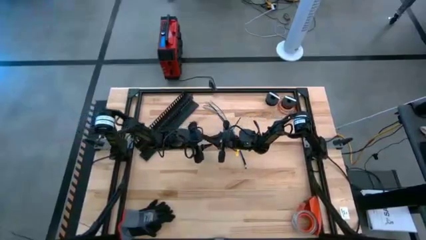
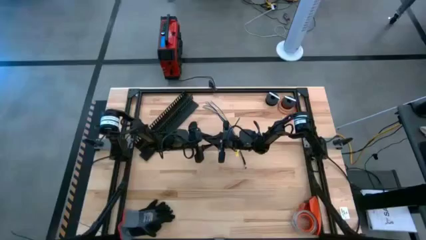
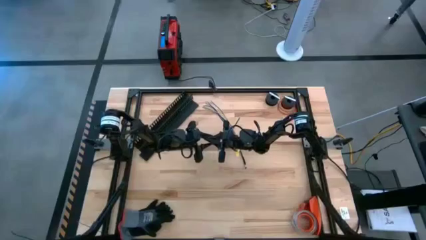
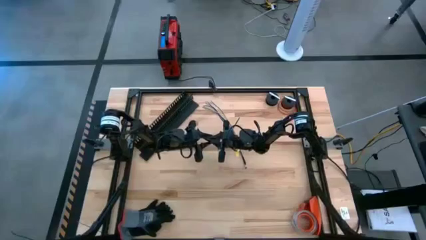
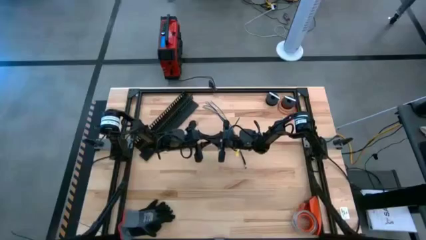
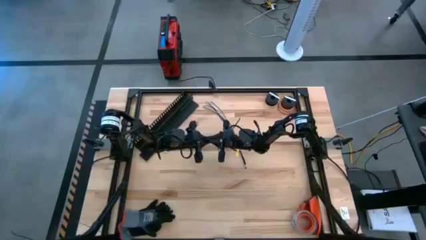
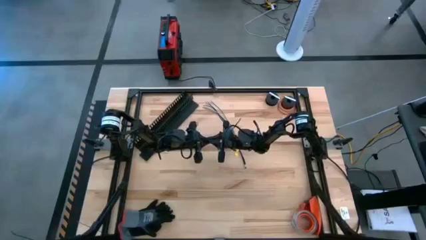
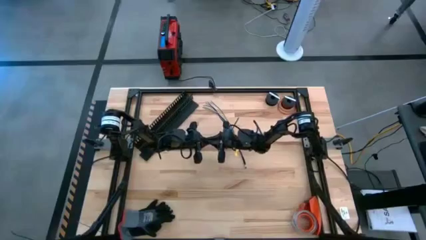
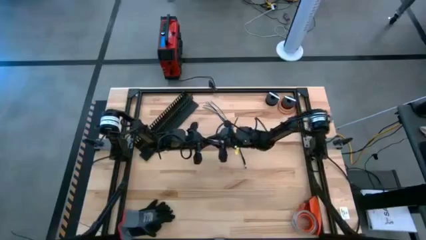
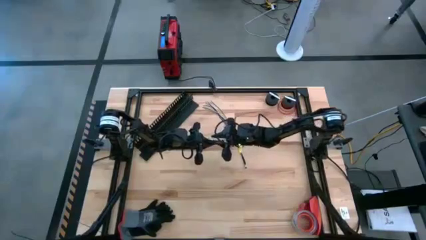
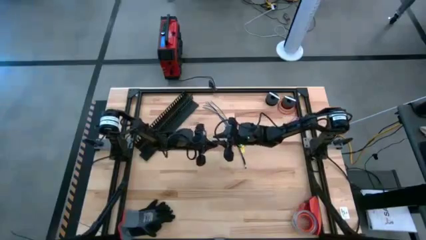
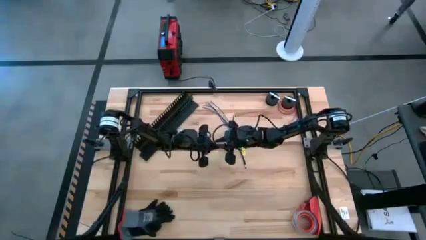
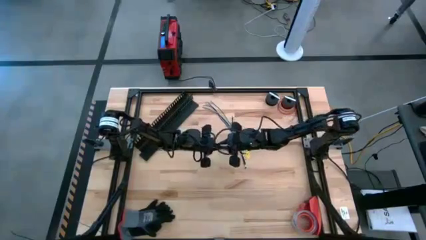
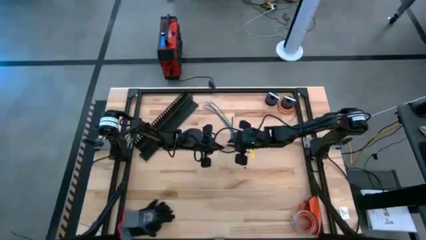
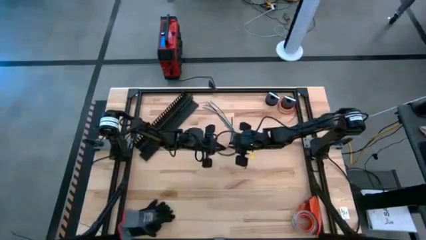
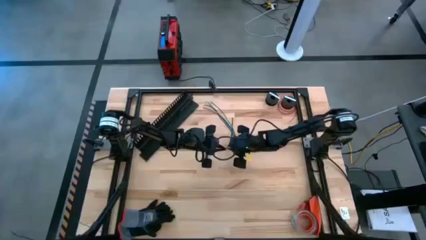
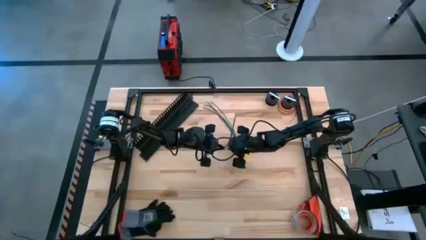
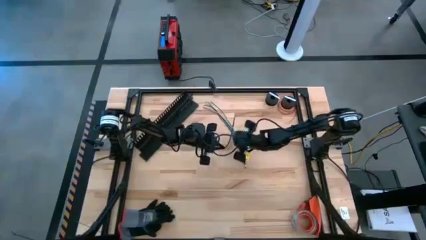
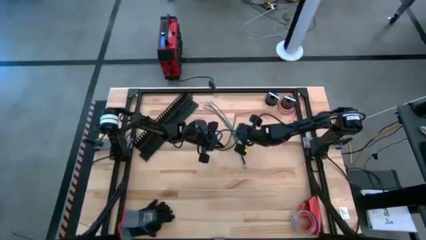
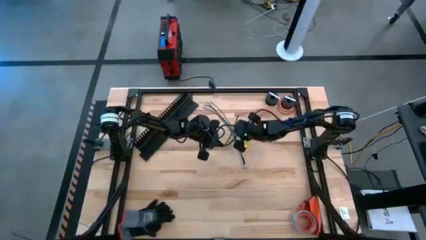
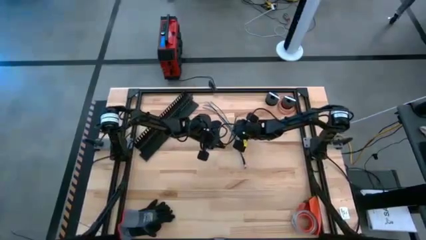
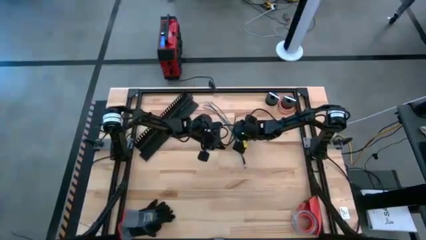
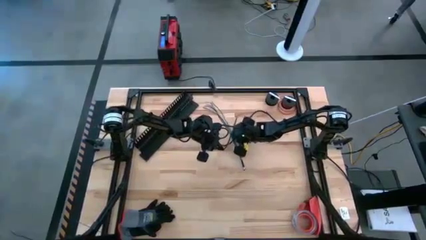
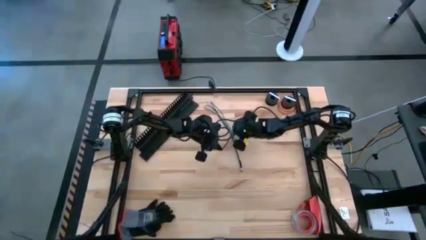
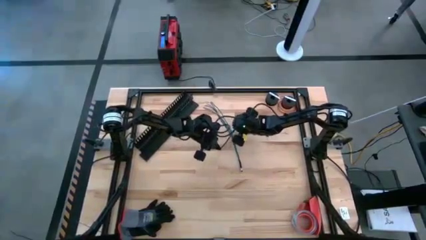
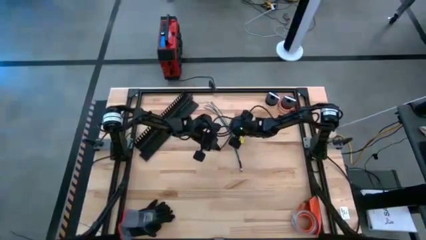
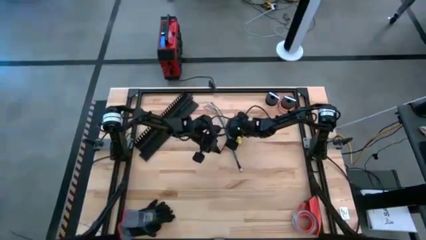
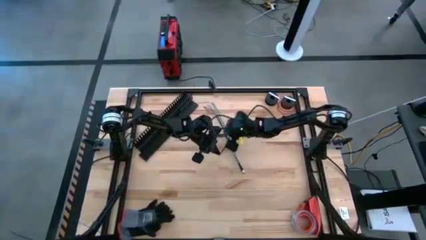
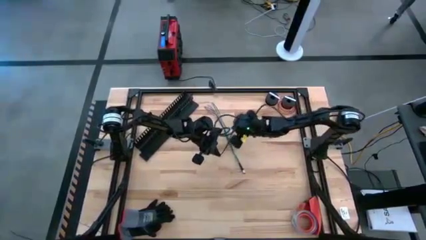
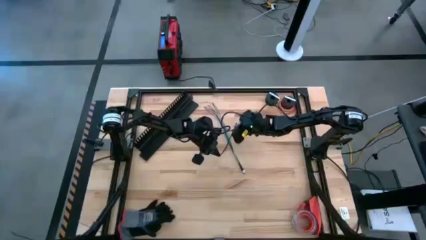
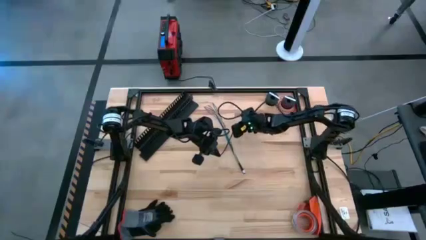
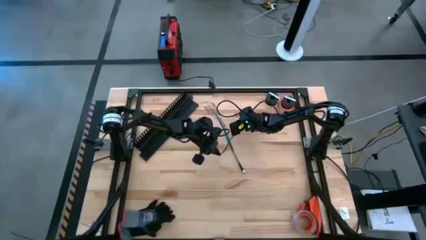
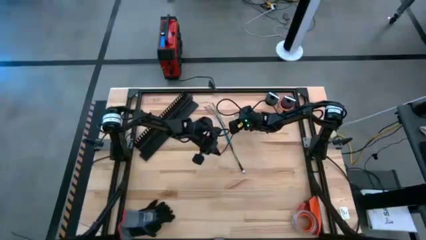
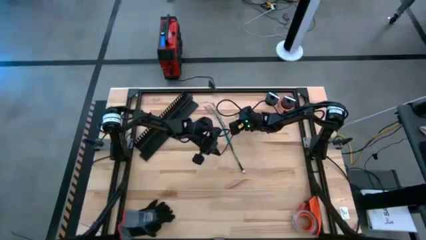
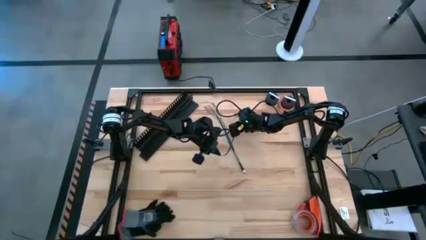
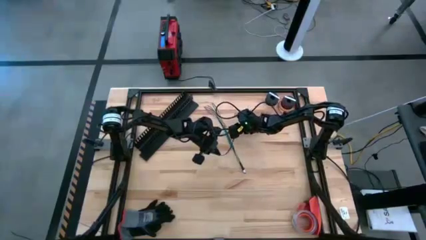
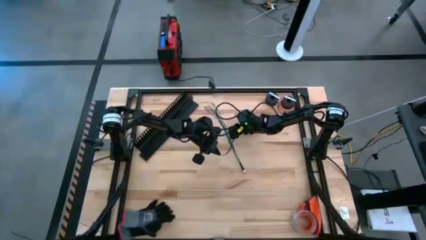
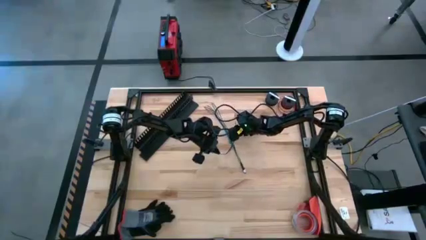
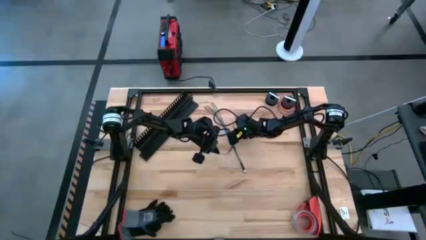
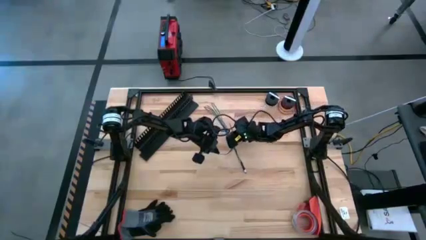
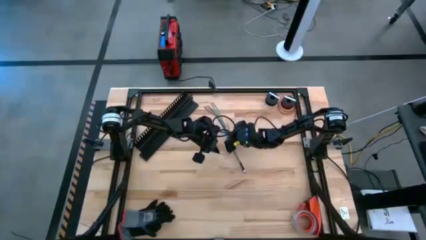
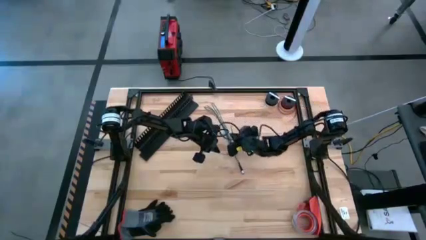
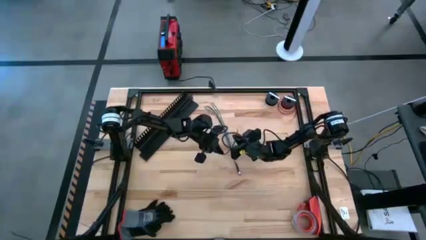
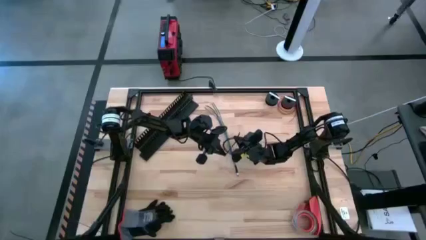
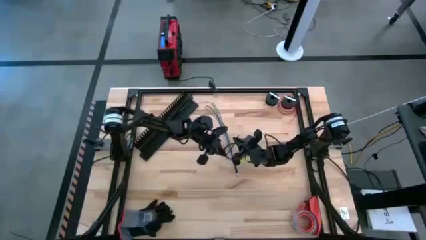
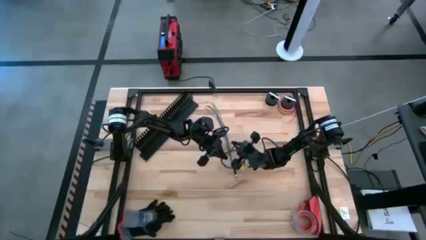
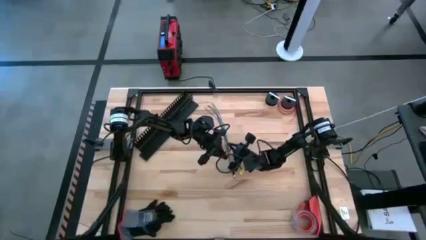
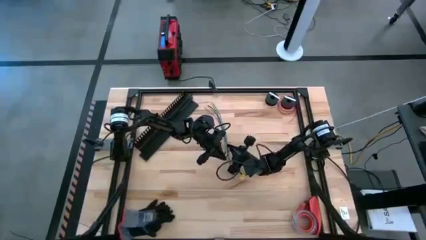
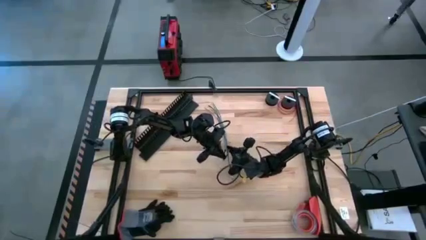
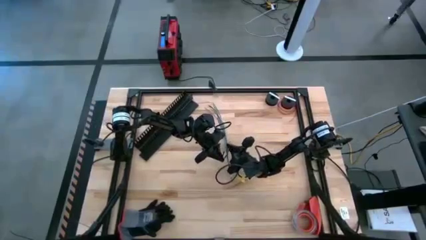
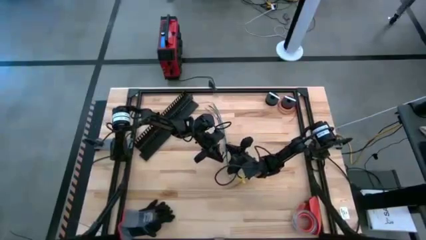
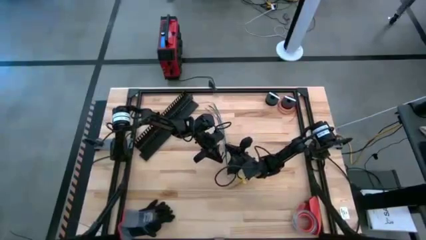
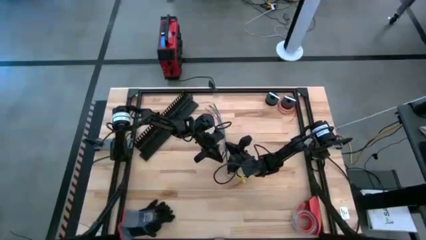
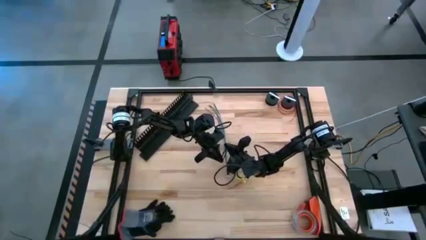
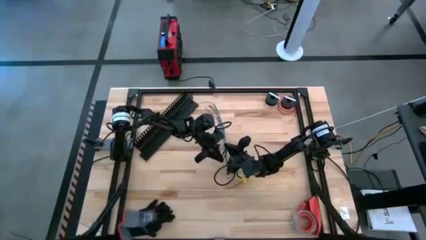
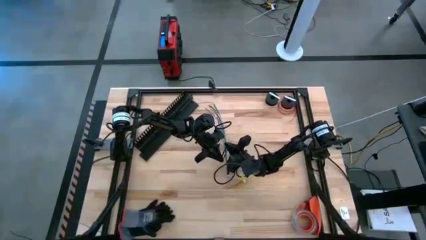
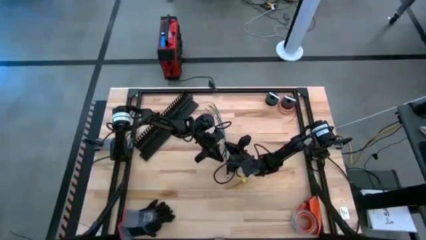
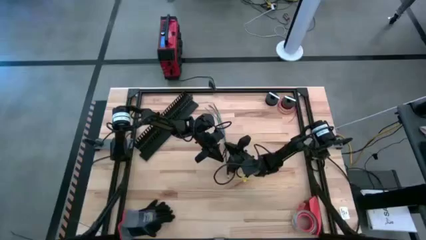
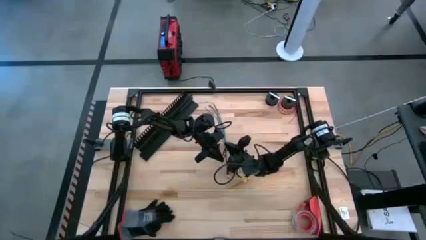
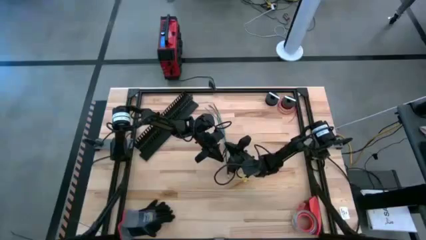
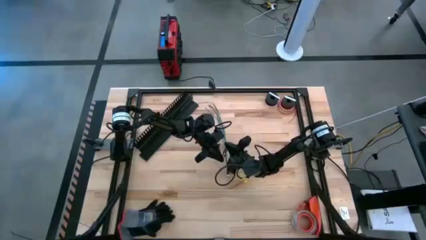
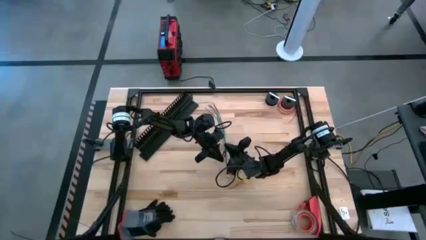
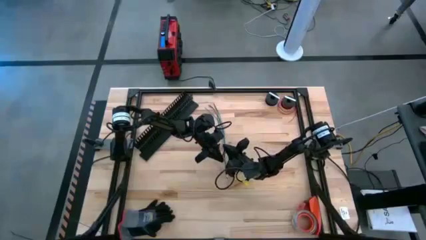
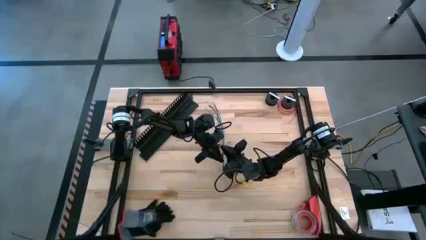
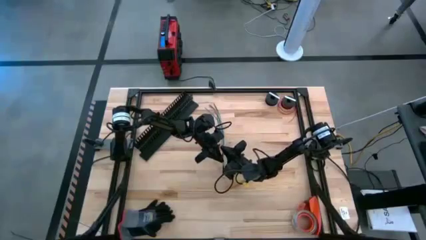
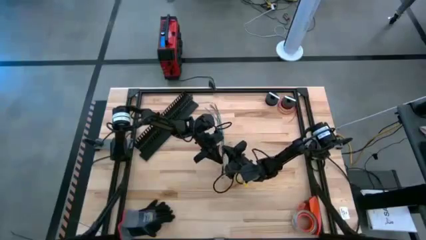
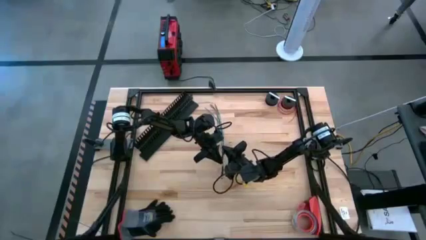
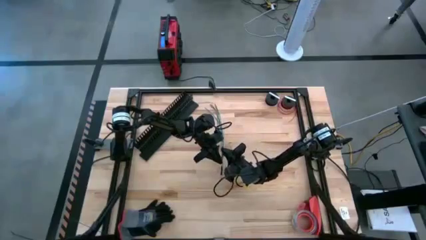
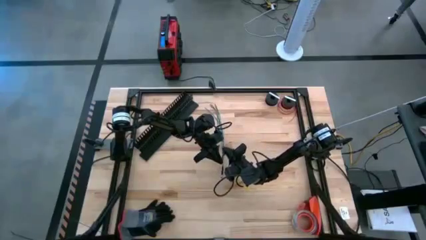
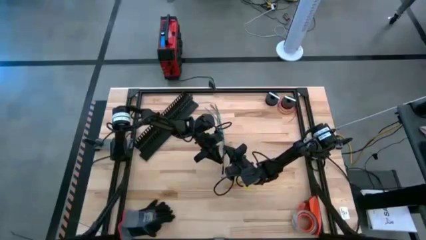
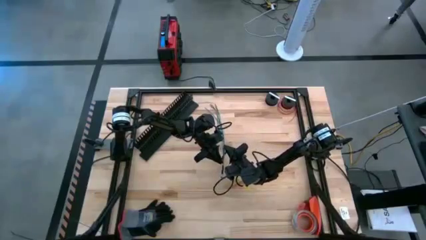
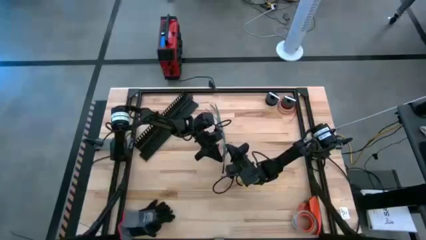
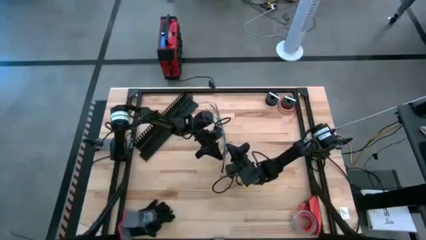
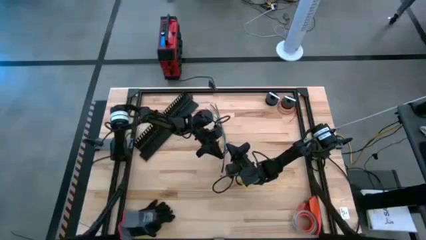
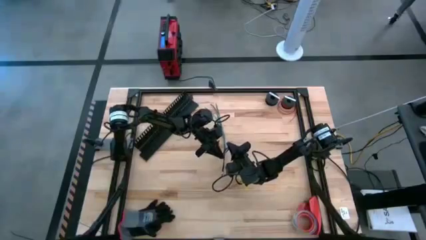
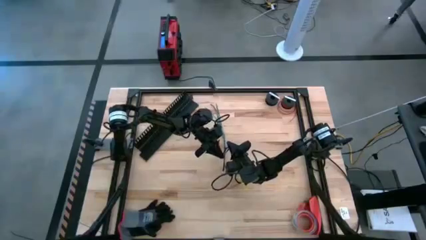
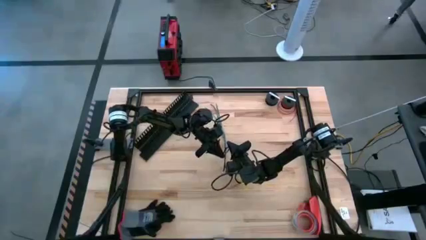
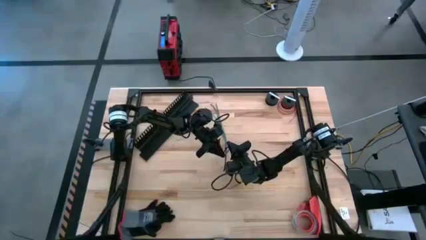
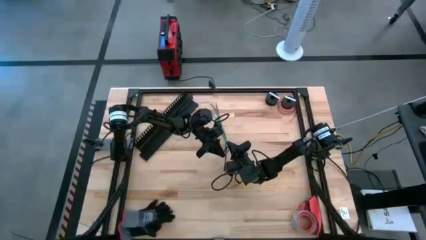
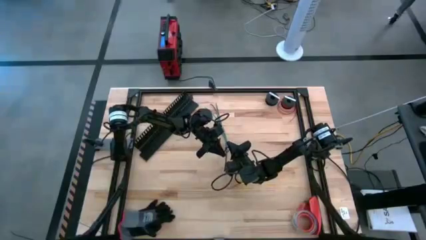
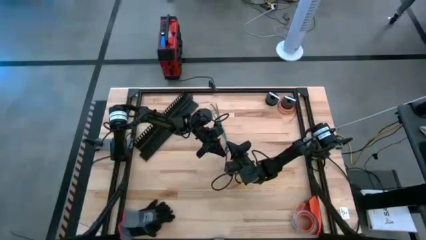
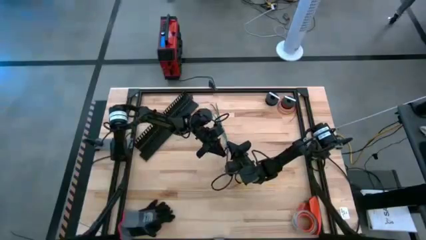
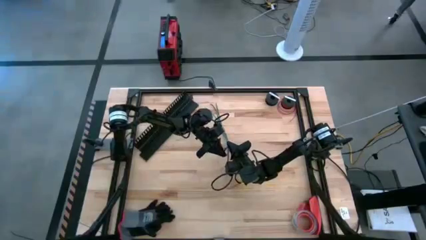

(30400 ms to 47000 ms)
Task: Ziptie cables
Wrap the cable wires together using a black zip tie
